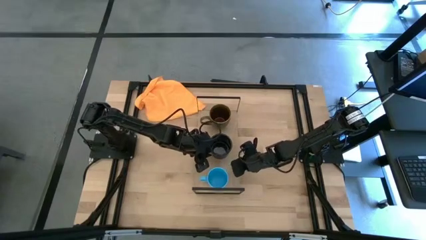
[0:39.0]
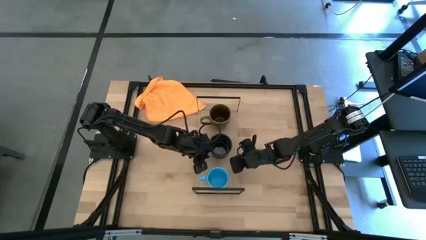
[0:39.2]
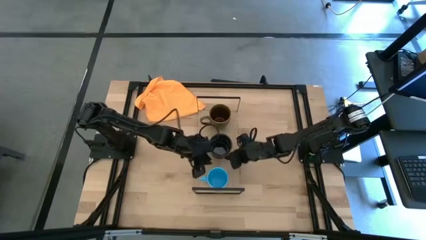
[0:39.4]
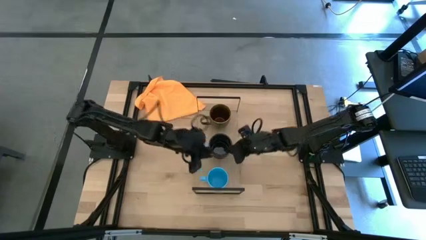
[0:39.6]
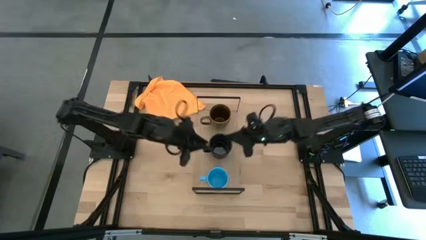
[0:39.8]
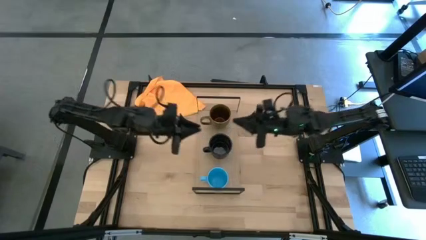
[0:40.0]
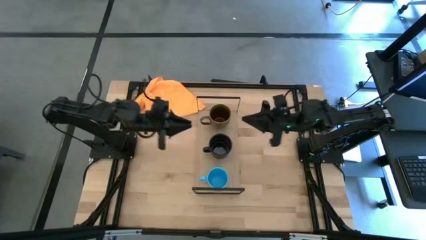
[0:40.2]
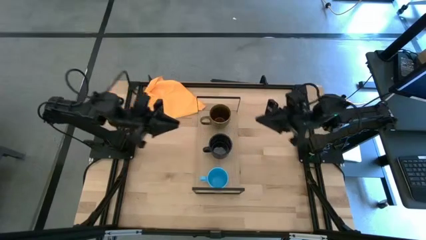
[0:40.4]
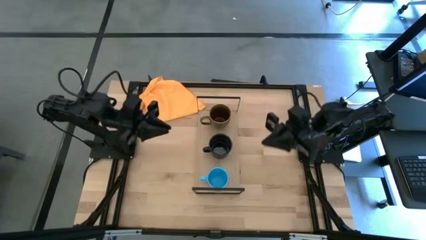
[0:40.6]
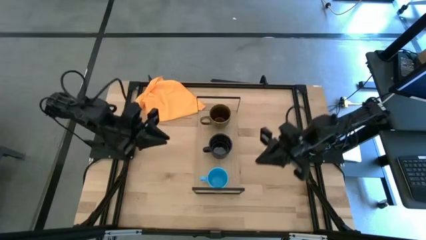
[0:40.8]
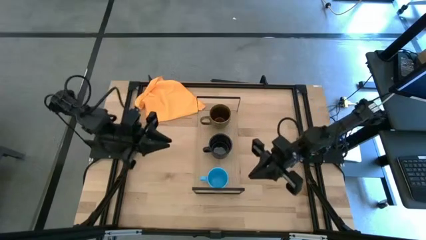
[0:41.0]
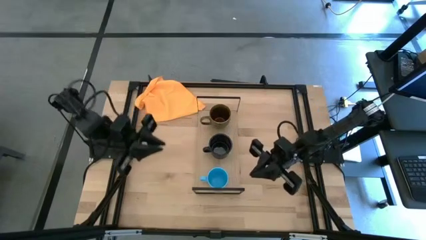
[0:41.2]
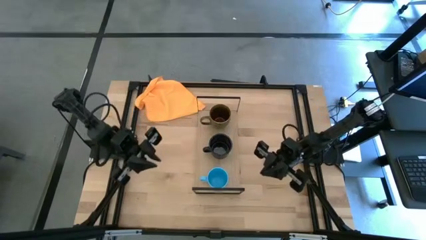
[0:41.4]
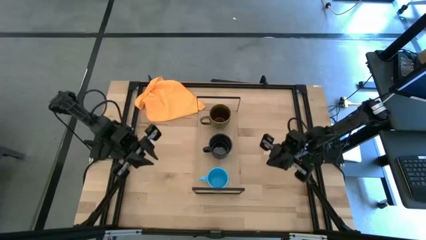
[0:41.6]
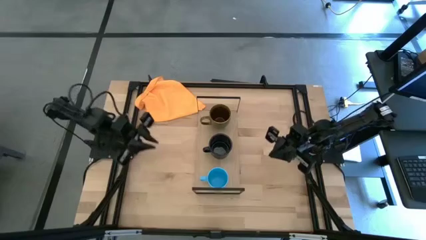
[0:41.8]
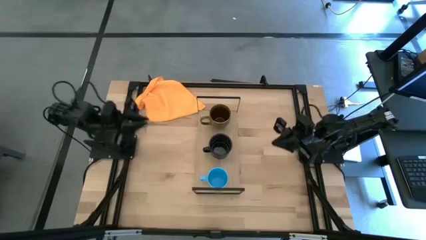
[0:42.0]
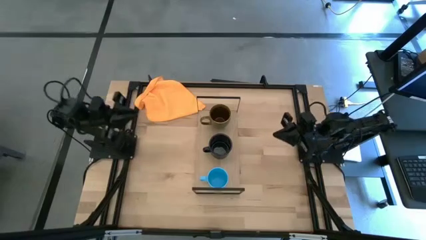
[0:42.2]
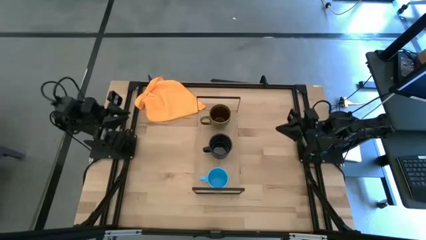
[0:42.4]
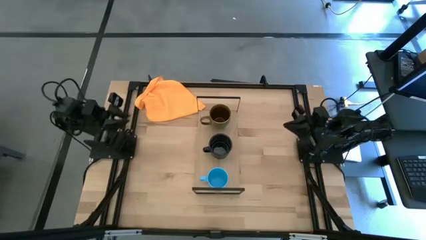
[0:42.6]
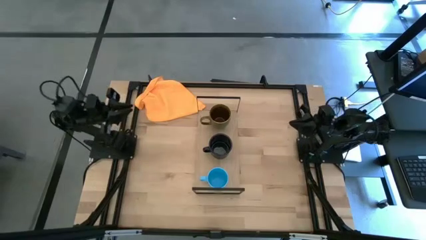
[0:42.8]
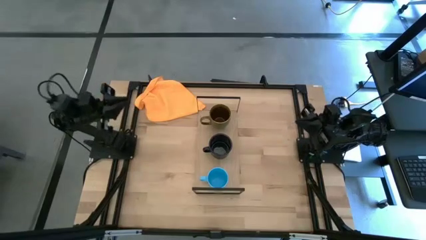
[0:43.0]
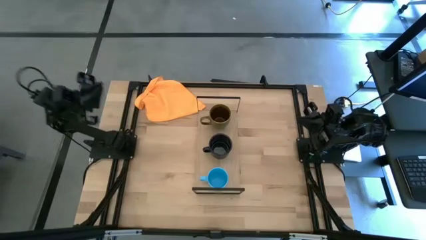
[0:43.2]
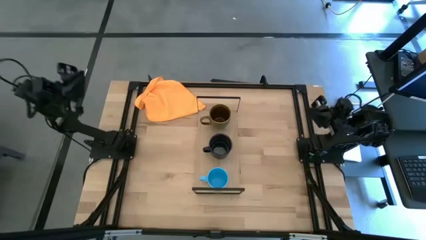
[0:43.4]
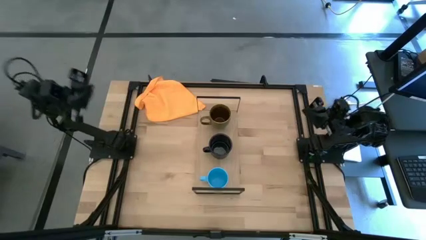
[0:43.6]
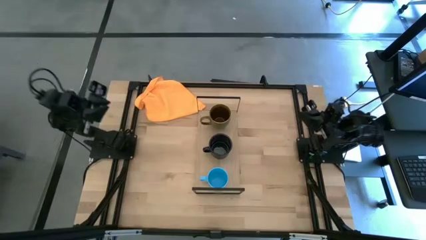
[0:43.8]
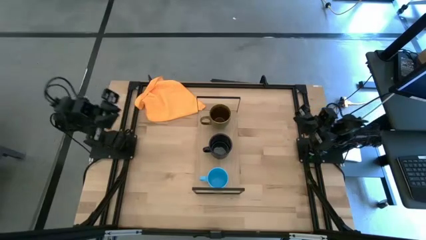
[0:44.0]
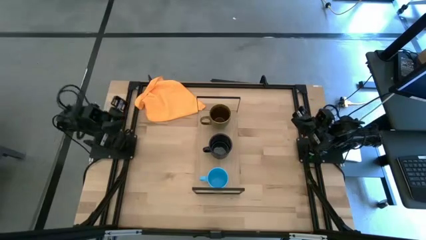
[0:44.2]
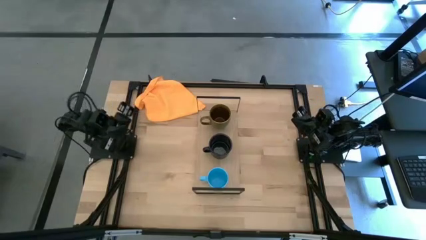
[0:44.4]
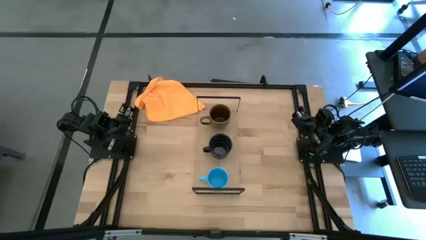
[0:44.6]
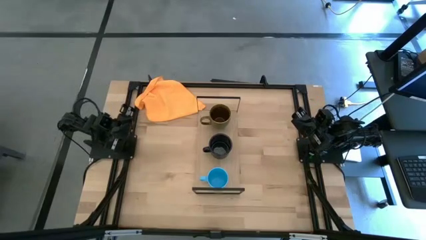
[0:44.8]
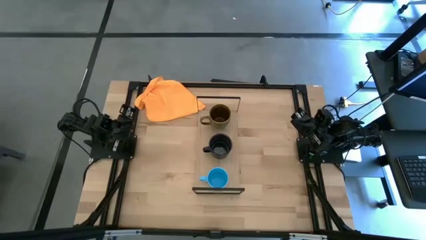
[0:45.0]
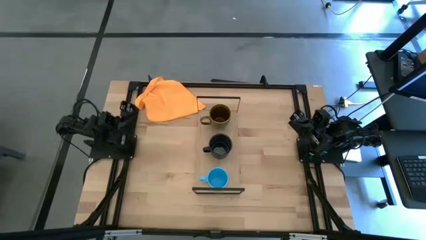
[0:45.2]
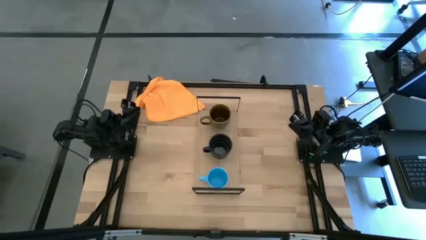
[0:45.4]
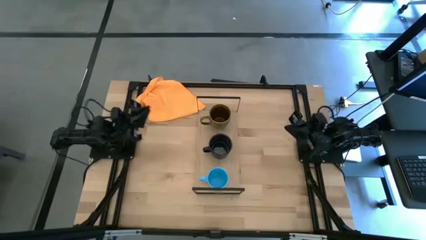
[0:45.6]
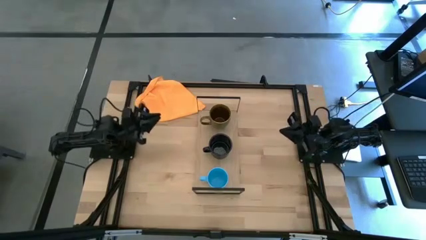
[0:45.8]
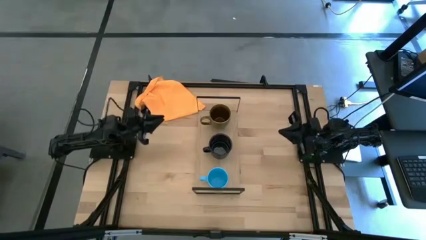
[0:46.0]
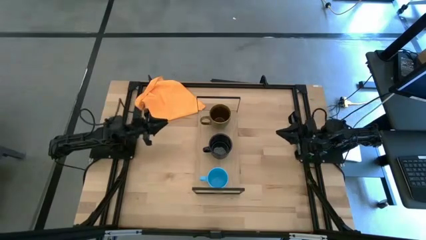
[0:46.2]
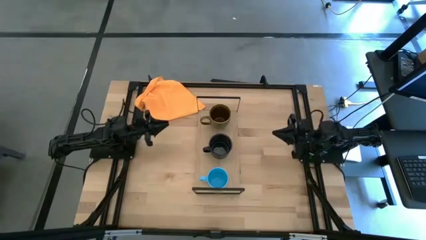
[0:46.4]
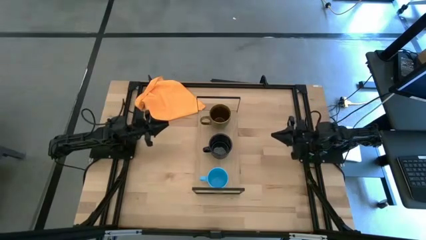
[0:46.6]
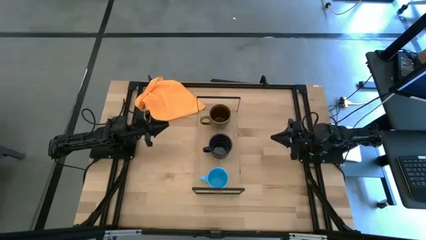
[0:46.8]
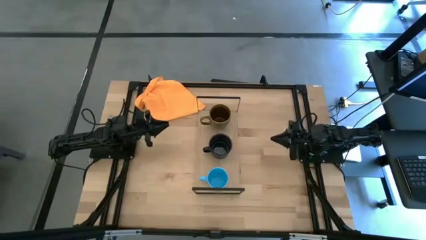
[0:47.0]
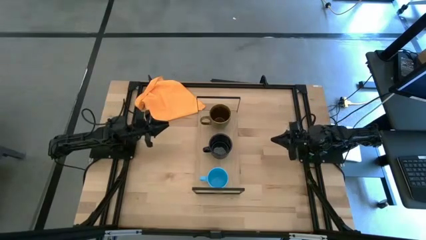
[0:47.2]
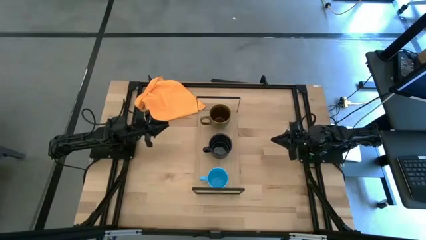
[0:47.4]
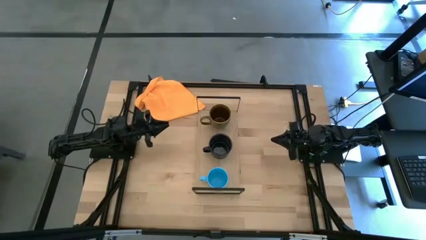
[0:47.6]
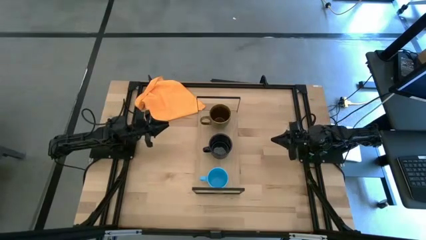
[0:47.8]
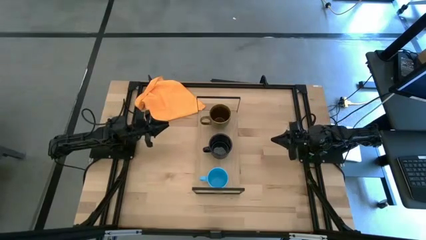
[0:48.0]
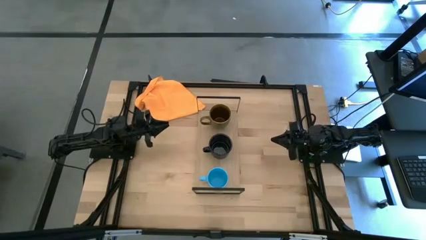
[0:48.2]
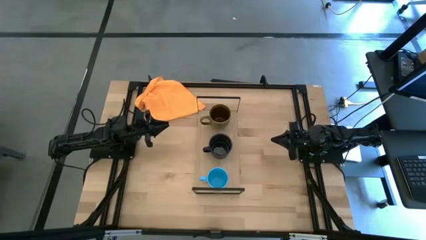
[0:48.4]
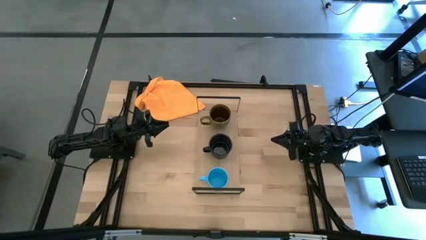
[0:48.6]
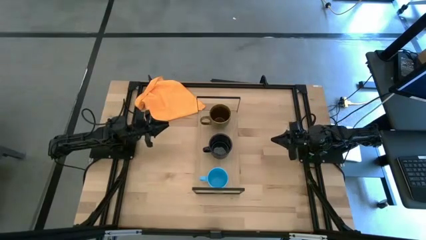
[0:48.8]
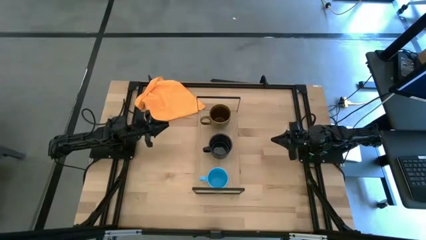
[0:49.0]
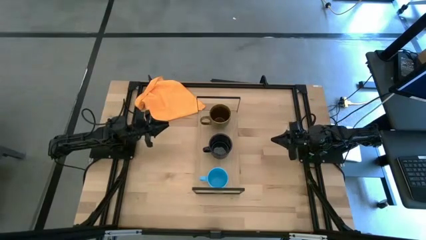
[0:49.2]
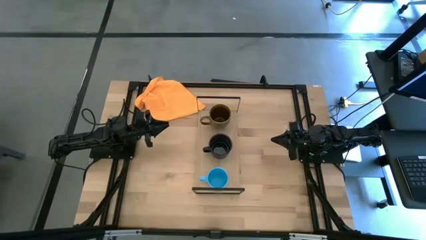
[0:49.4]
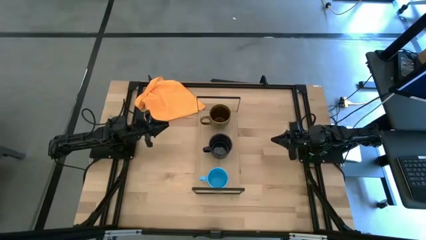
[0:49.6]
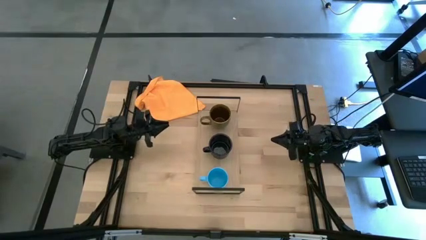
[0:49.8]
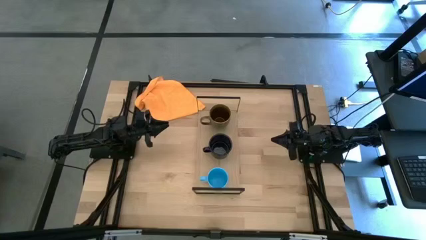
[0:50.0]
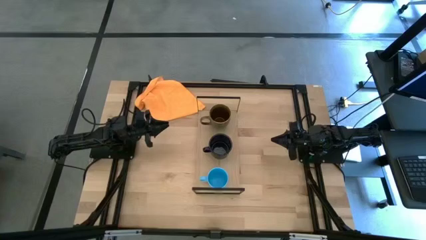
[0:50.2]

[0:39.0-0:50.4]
Task: Stack small to large cups/mugs on shelf
Return to Home Position

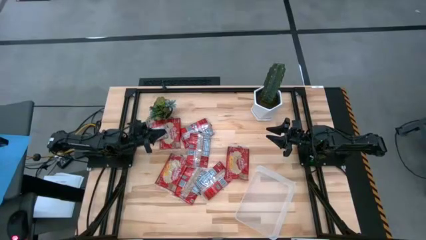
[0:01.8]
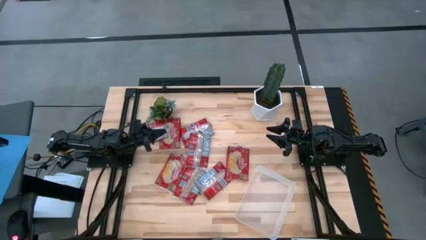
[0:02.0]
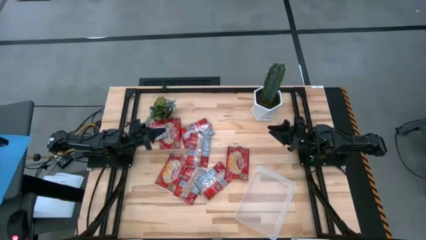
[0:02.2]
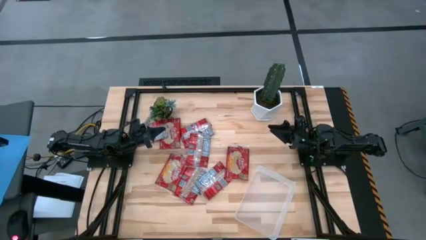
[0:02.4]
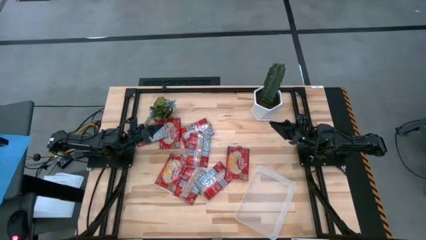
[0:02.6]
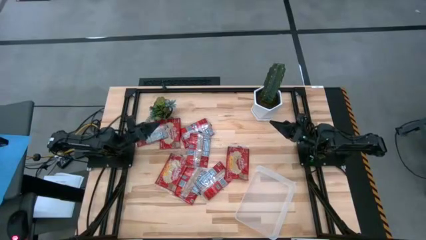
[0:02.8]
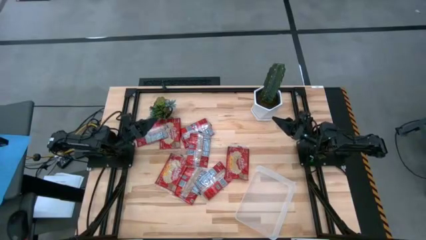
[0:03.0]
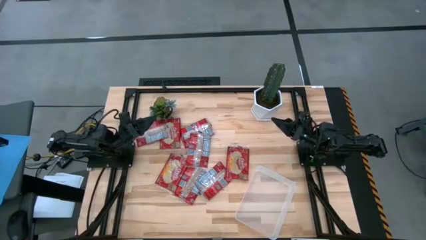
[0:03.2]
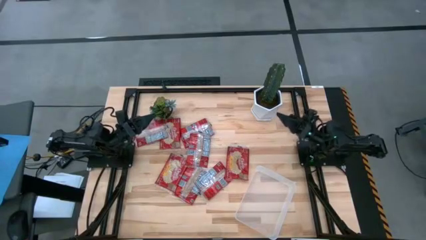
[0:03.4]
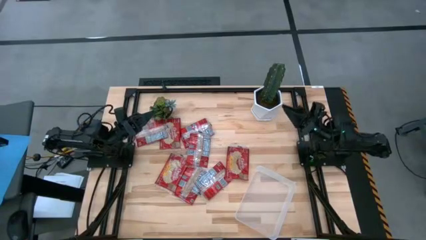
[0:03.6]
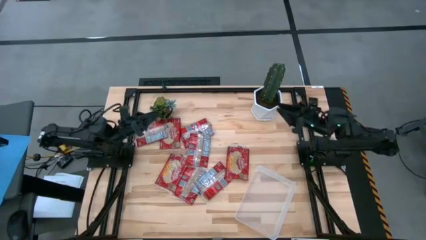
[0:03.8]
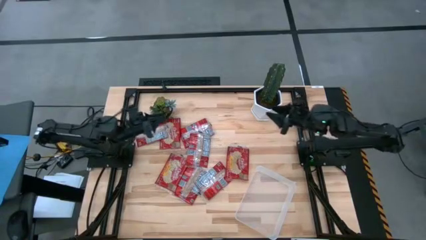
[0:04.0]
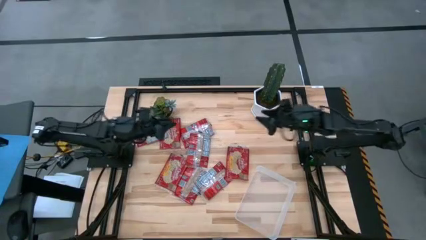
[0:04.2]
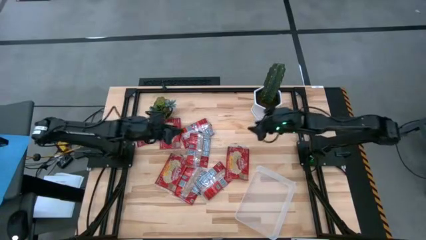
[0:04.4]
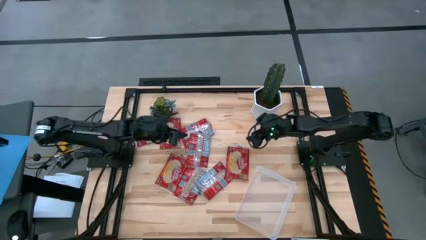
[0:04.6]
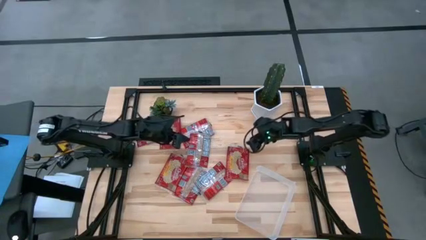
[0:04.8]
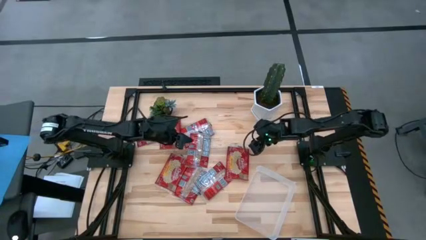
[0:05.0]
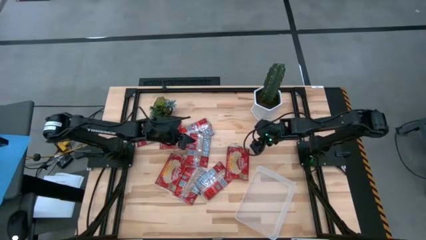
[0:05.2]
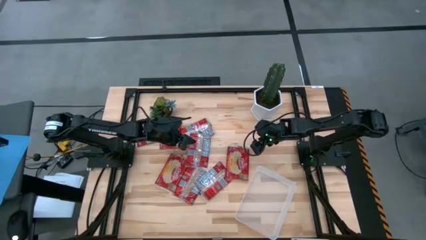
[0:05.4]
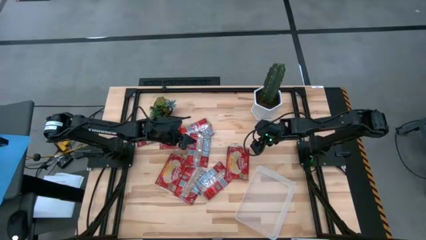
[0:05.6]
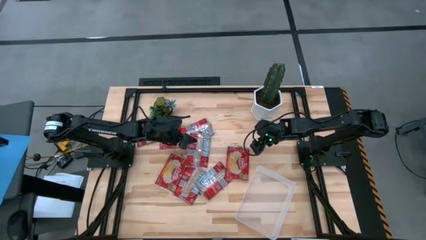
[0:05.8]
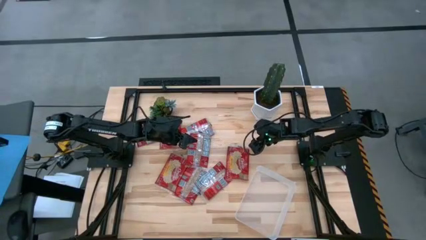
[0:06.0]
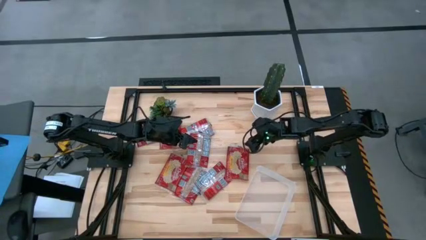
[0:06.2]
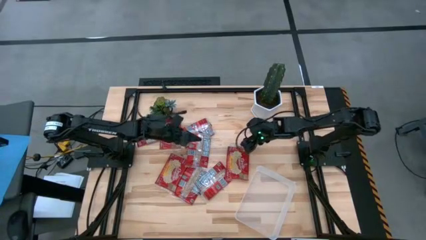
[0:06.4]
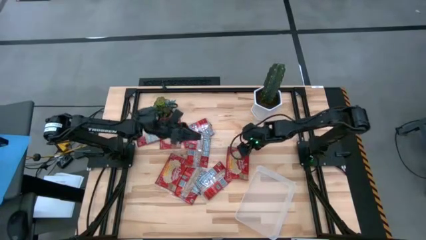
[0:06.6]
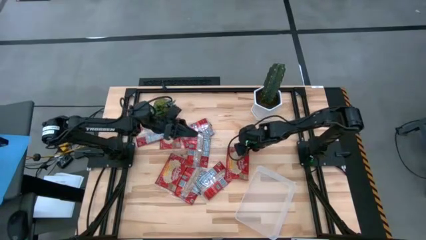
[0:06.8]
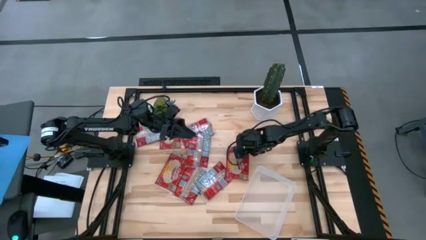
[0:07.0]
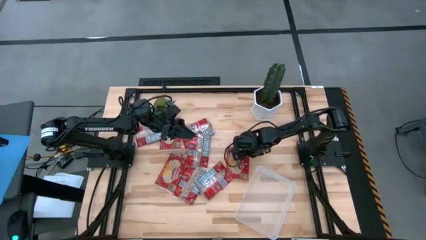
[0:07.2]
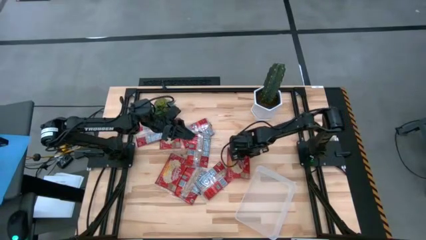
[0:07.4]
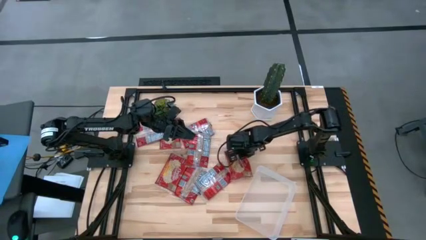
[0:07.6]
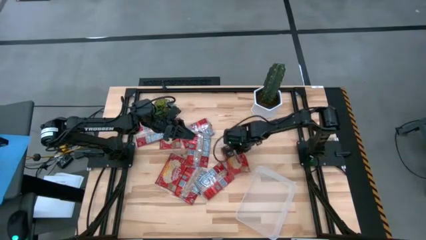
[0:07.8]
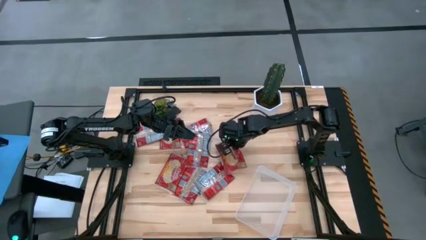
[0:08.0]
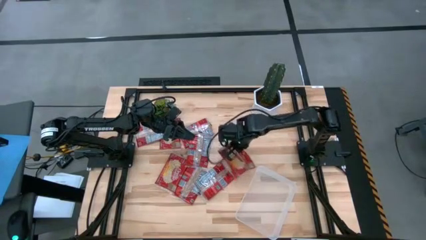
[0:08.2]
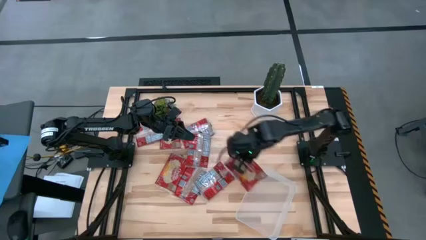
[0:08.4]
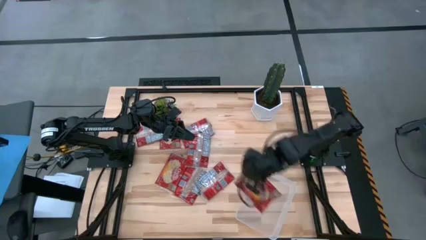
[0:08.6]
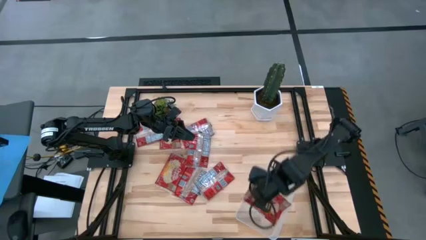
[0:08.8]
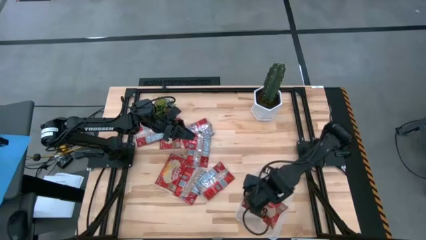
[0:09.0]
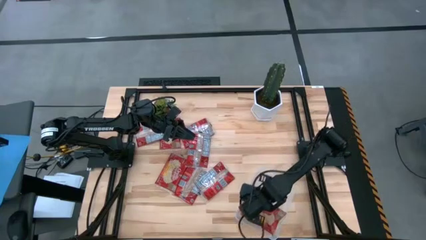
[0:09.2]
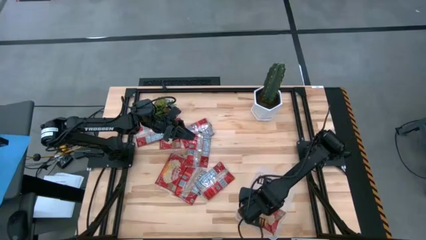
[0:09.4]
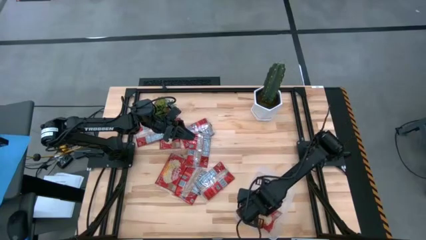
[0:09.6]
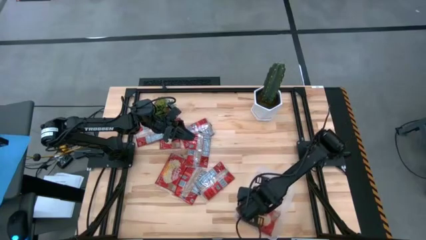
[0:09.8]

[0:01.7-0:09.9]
Task: Sort popcorn bags into baskets
Put the red popcorn bag into the transparent bin
